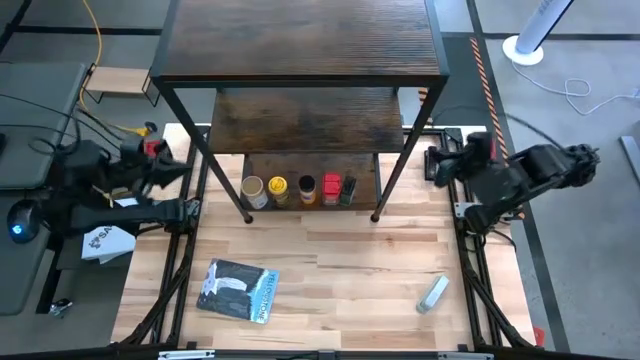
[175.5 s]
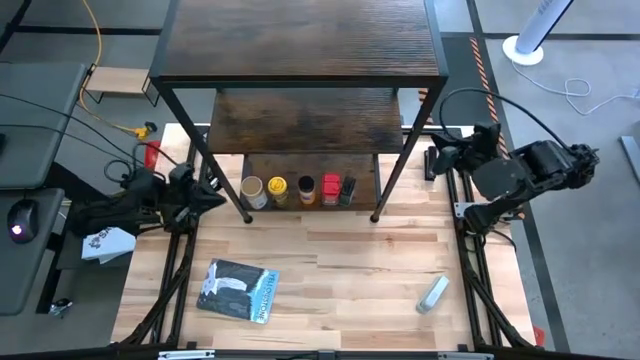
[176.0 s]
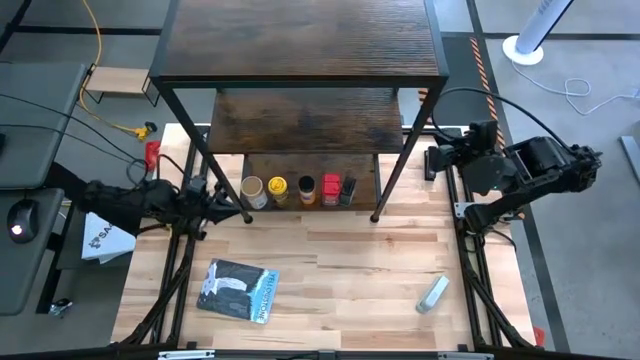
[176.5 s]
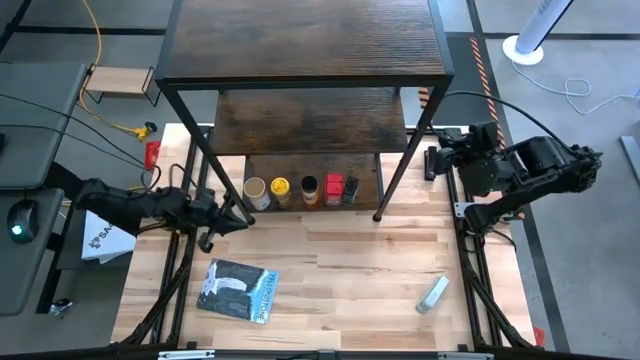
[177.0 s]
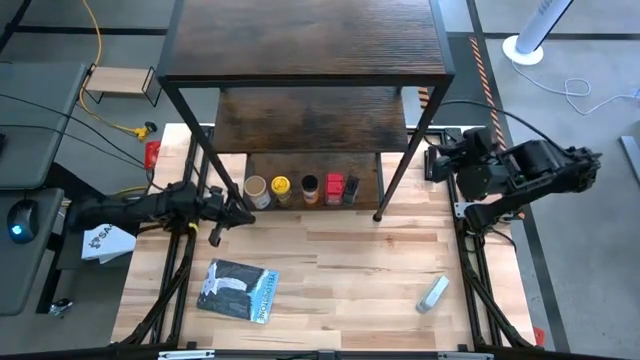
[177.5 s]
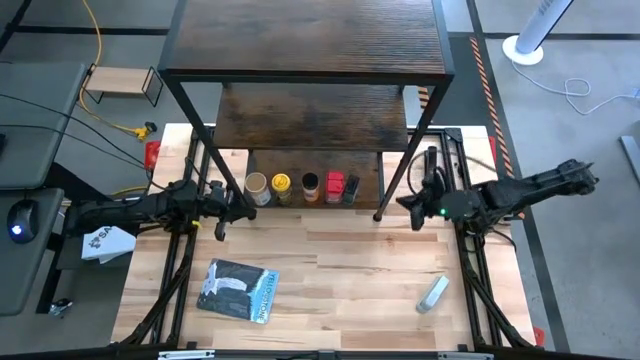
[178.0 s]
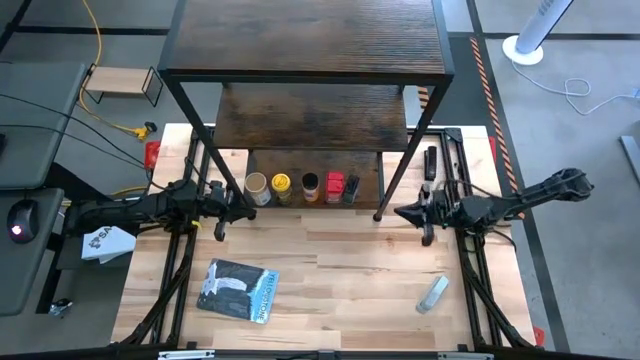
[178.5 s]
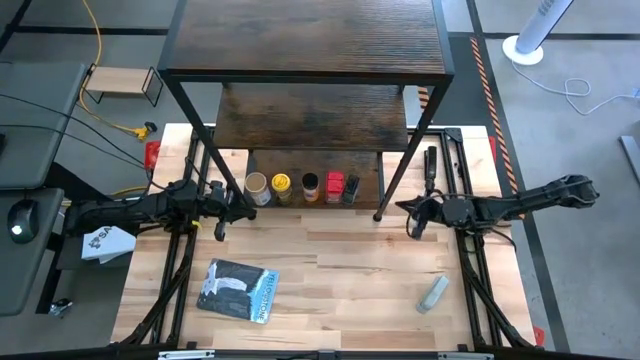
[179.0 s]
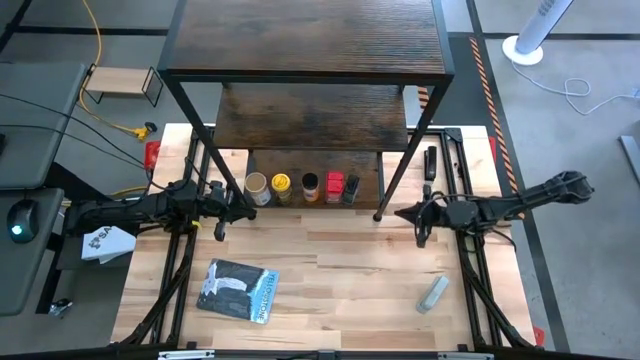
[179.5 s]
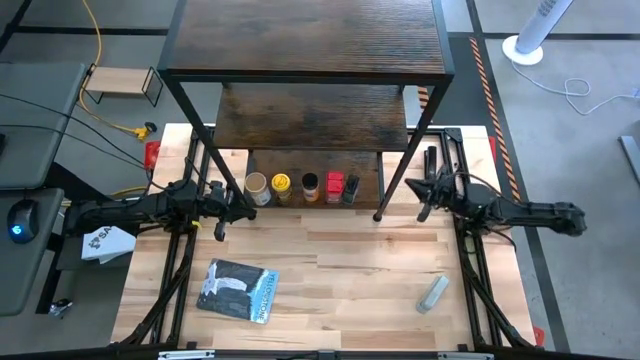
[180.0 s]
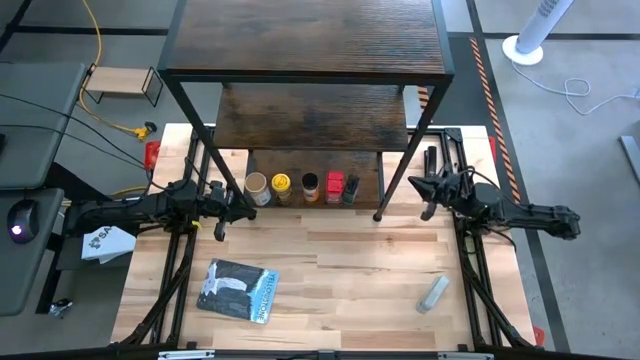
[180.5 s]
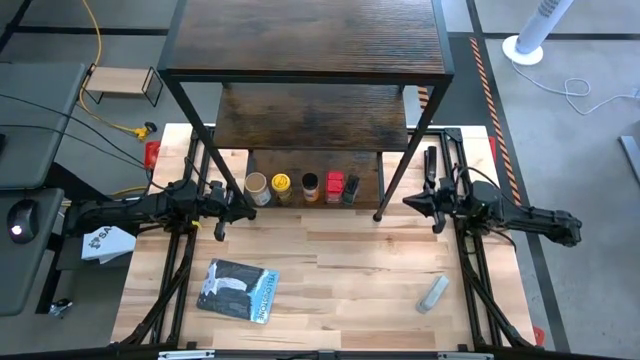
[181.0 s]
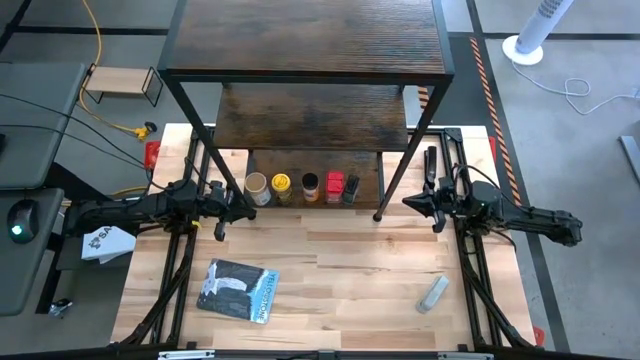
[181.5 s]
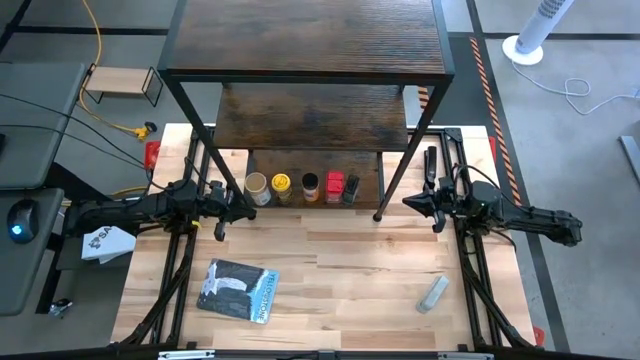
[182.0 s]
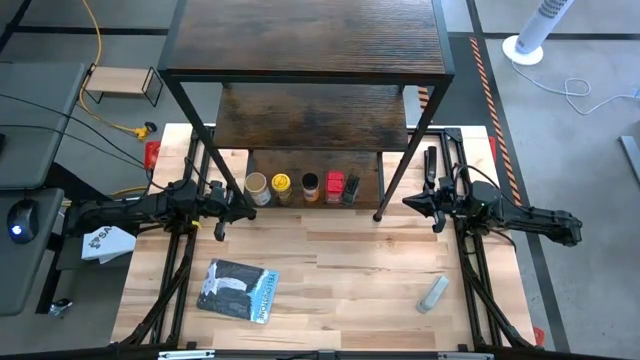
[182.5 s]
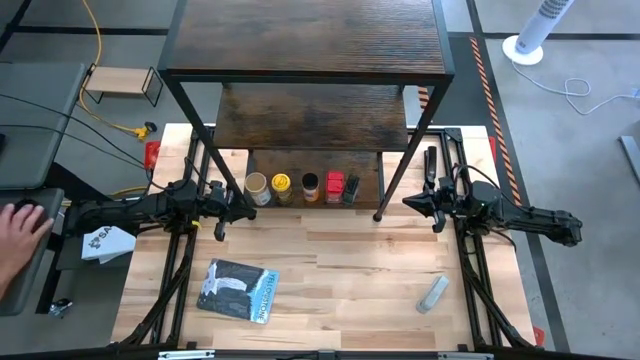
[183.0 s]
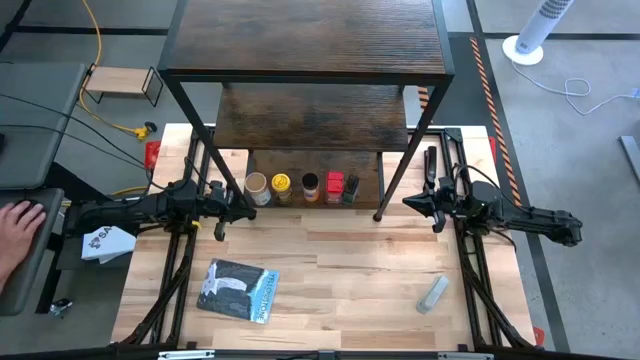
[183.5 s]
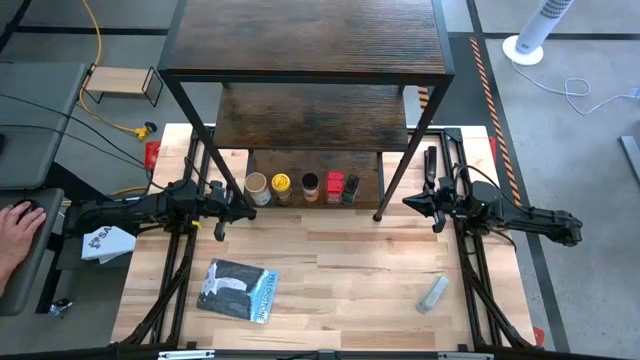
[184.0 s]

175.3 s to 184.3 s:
Task: Shelf spices
Return to Home Position
